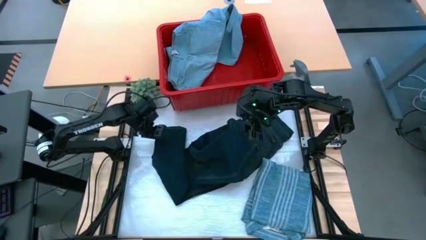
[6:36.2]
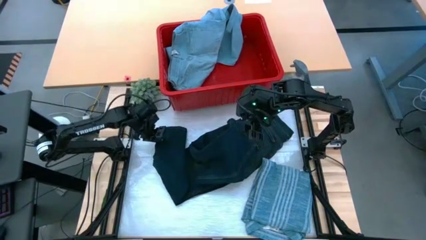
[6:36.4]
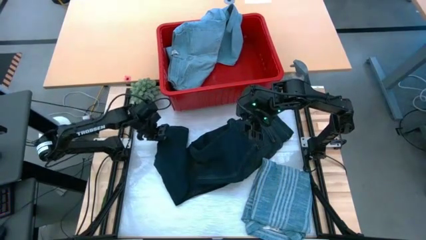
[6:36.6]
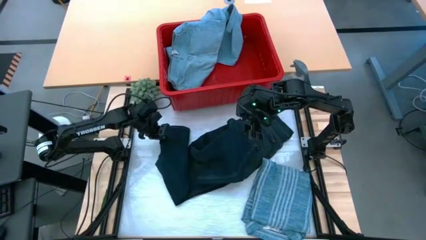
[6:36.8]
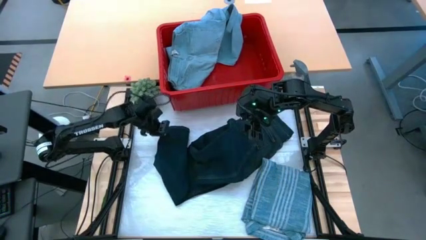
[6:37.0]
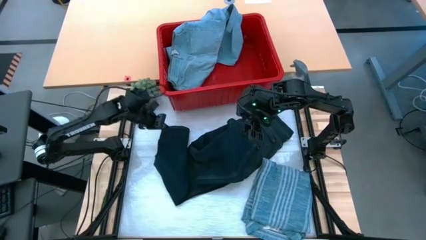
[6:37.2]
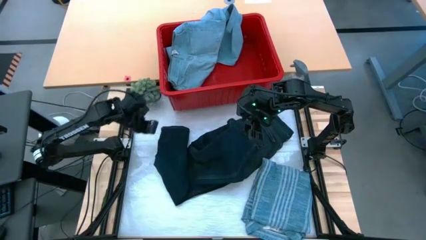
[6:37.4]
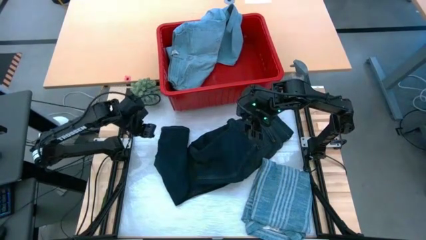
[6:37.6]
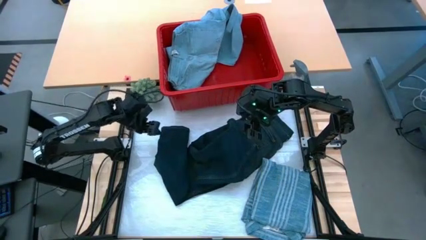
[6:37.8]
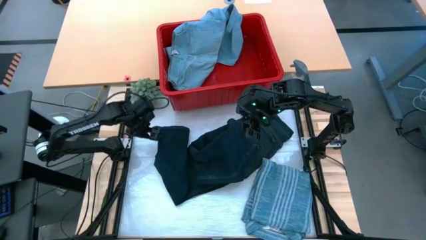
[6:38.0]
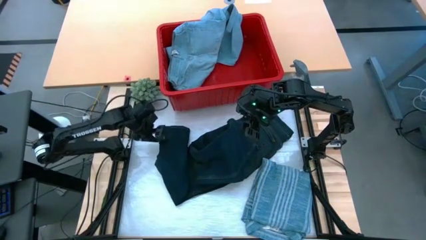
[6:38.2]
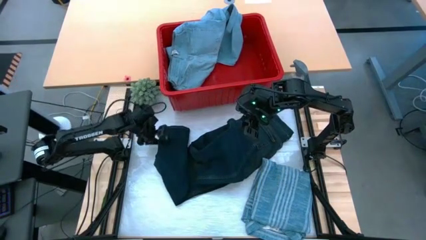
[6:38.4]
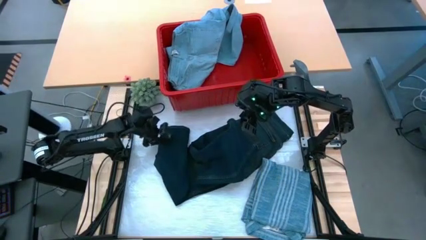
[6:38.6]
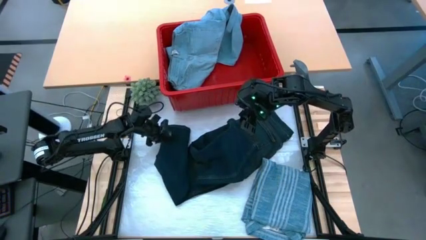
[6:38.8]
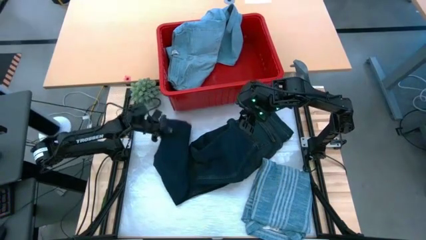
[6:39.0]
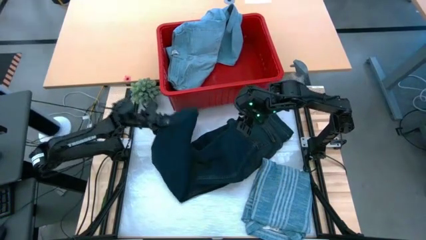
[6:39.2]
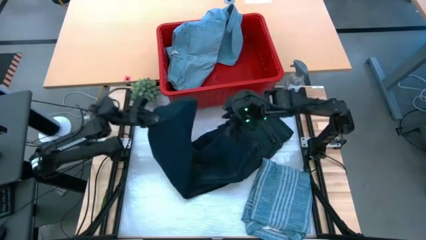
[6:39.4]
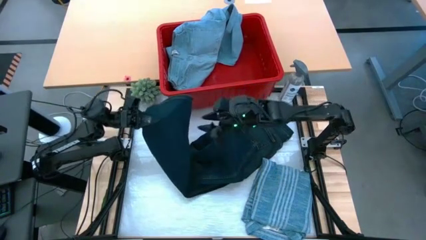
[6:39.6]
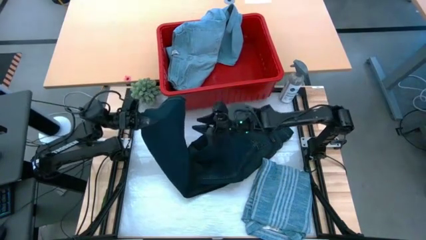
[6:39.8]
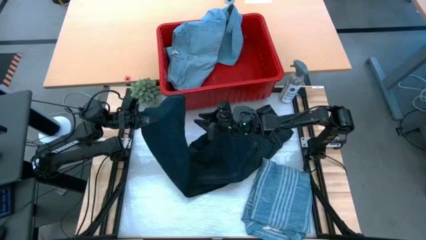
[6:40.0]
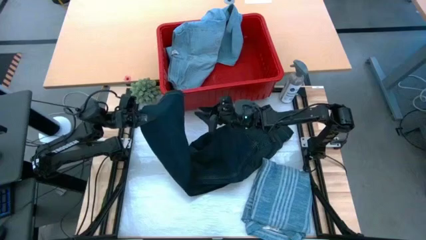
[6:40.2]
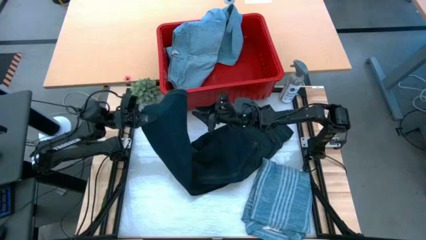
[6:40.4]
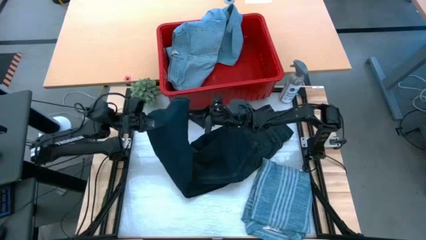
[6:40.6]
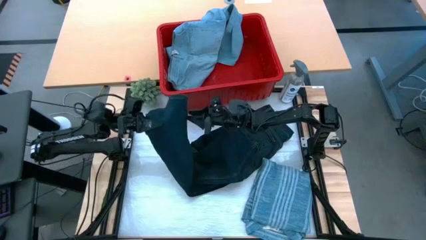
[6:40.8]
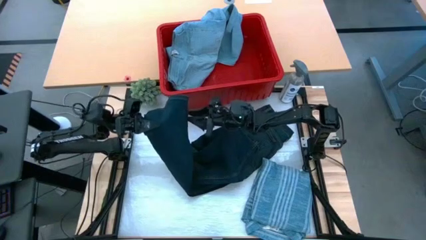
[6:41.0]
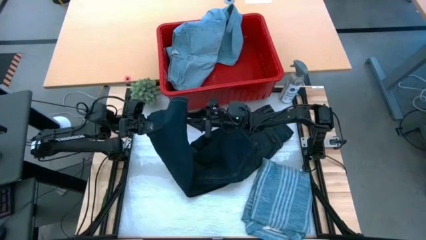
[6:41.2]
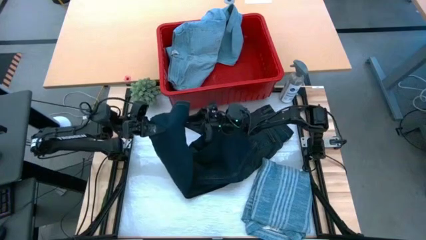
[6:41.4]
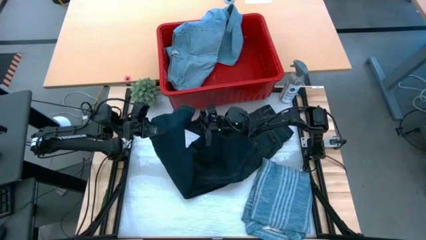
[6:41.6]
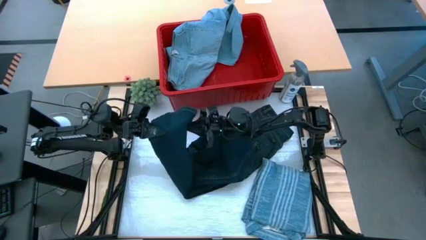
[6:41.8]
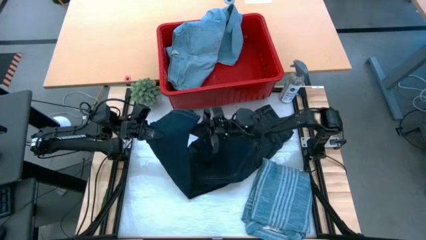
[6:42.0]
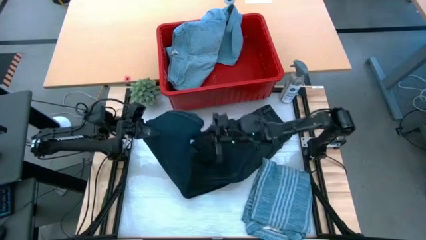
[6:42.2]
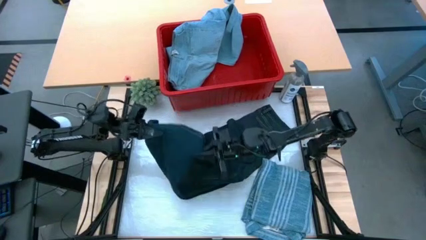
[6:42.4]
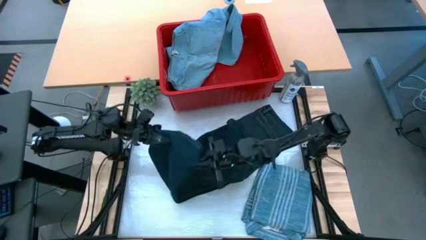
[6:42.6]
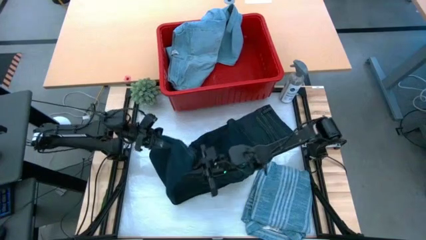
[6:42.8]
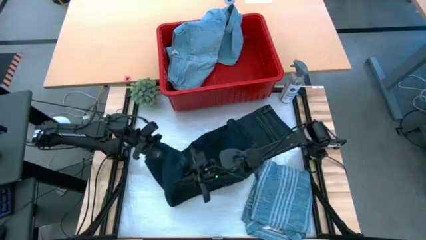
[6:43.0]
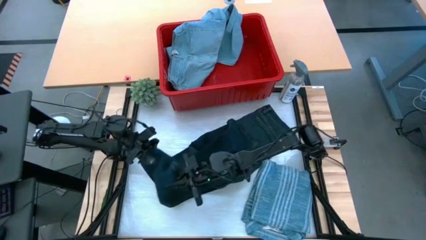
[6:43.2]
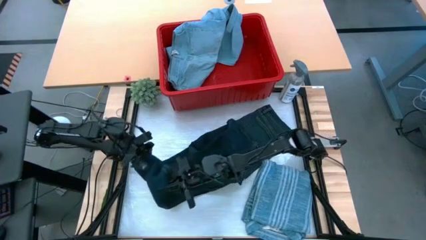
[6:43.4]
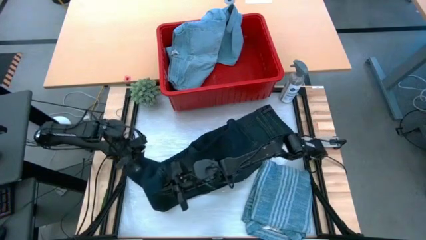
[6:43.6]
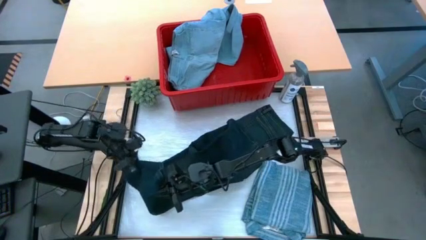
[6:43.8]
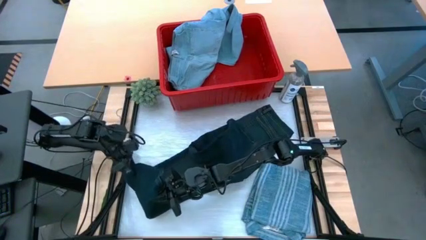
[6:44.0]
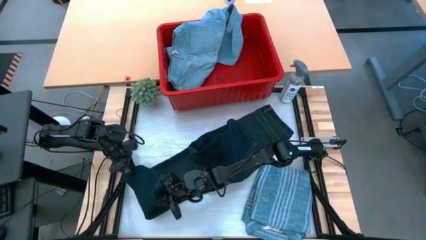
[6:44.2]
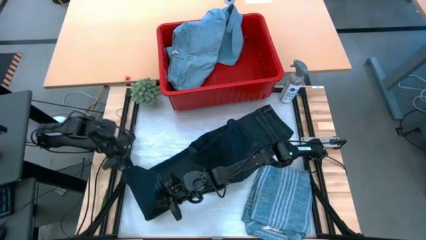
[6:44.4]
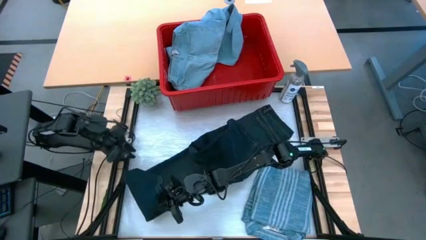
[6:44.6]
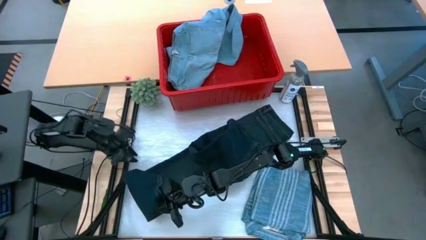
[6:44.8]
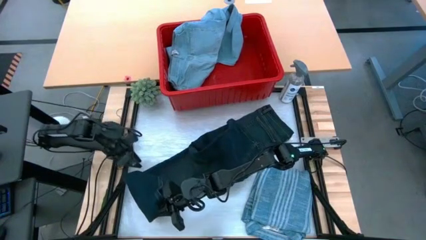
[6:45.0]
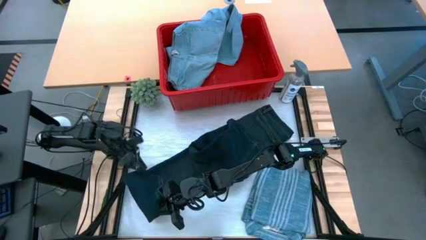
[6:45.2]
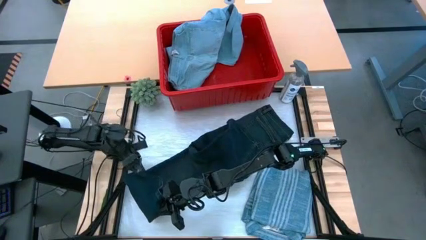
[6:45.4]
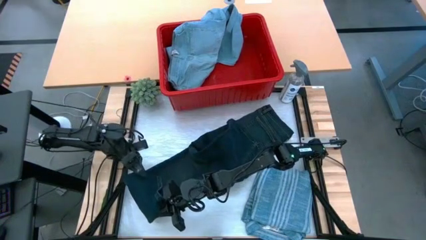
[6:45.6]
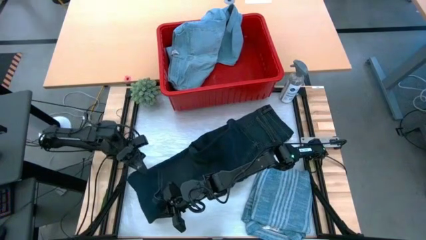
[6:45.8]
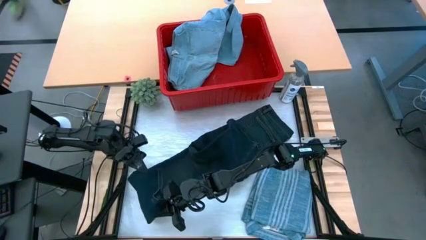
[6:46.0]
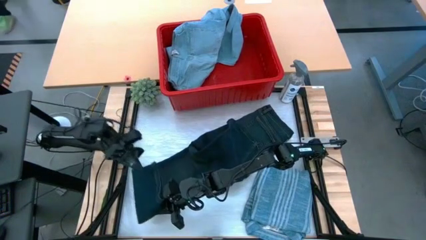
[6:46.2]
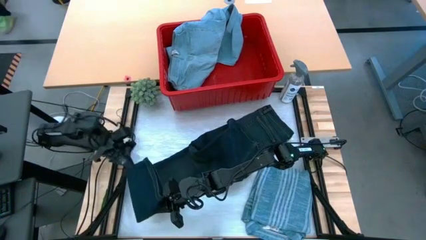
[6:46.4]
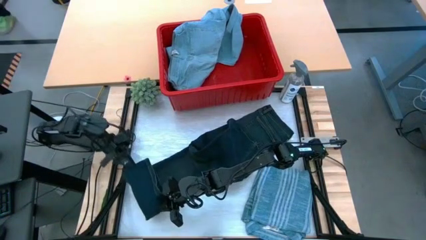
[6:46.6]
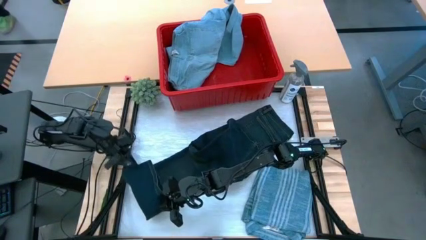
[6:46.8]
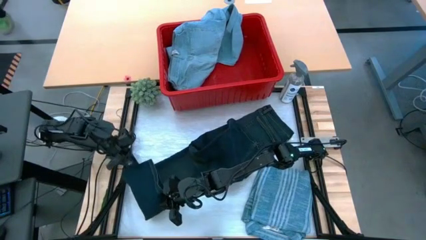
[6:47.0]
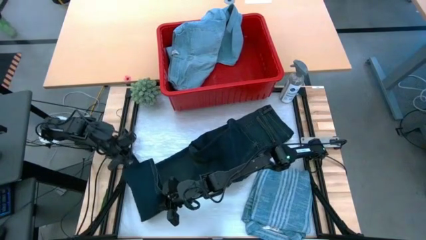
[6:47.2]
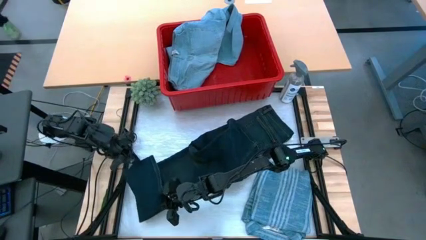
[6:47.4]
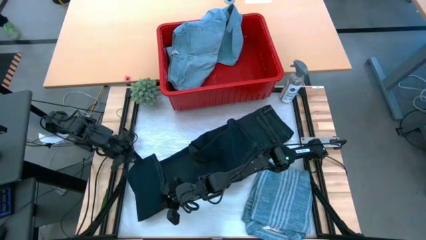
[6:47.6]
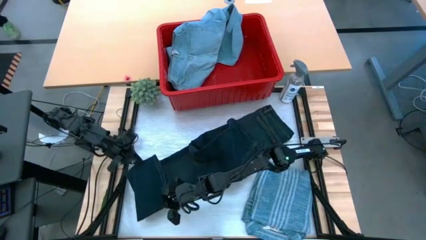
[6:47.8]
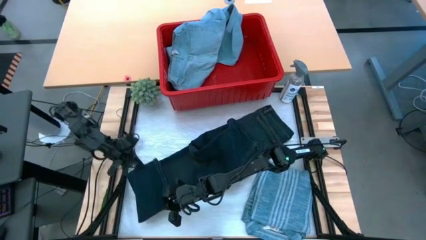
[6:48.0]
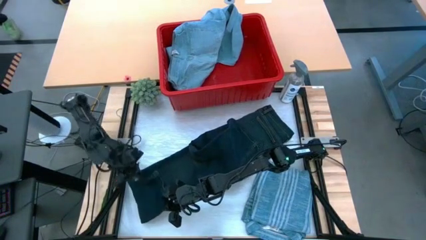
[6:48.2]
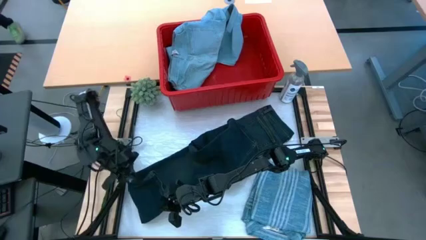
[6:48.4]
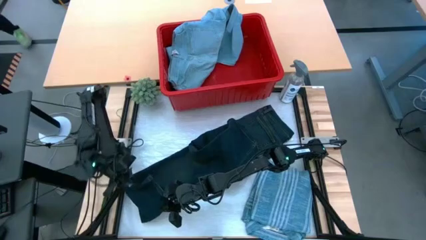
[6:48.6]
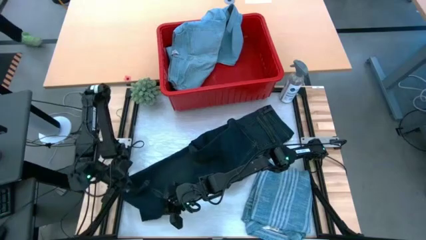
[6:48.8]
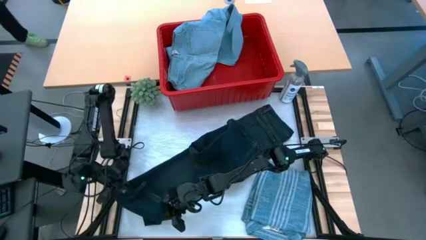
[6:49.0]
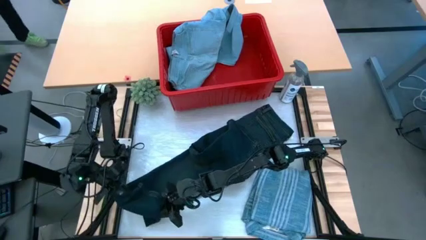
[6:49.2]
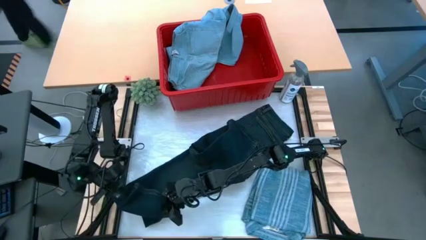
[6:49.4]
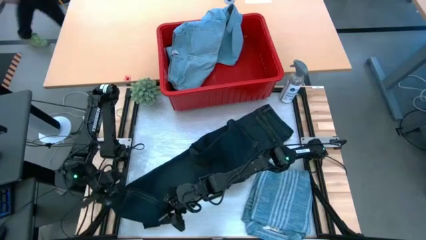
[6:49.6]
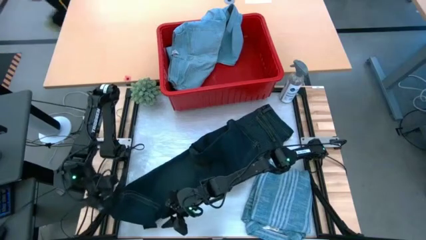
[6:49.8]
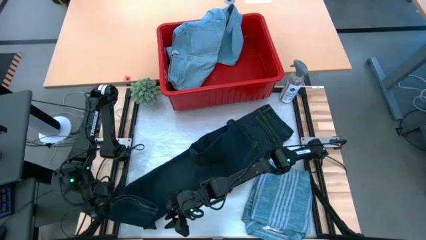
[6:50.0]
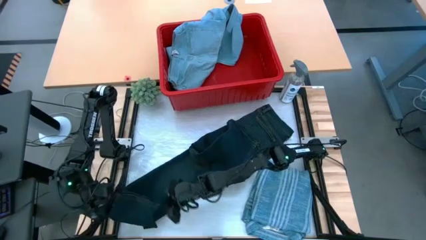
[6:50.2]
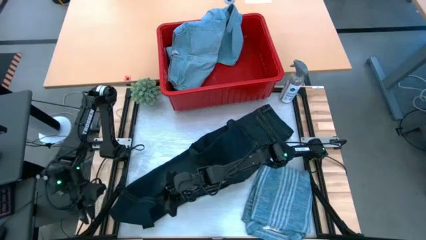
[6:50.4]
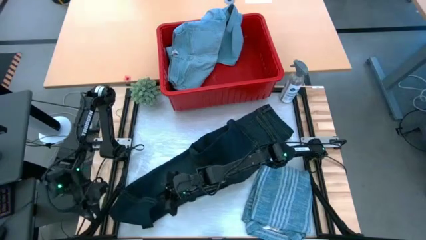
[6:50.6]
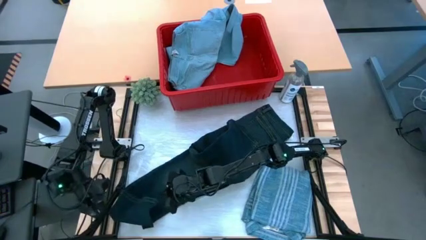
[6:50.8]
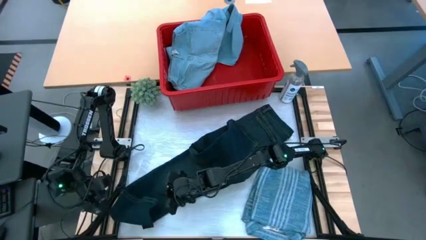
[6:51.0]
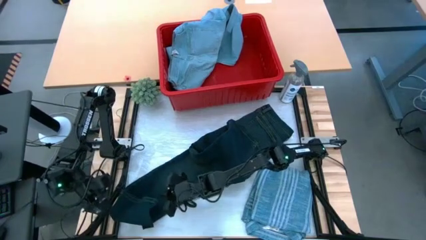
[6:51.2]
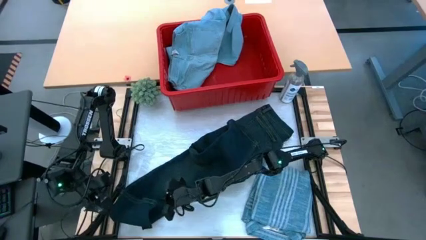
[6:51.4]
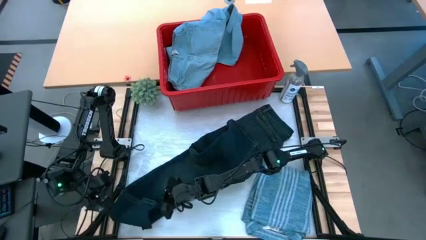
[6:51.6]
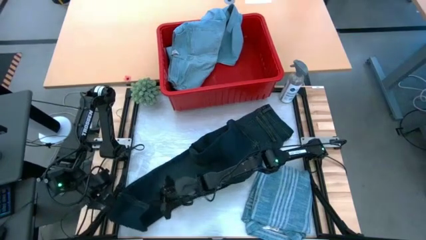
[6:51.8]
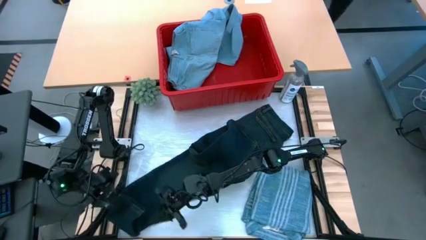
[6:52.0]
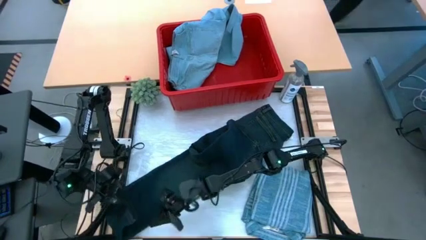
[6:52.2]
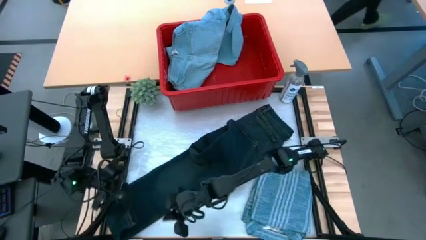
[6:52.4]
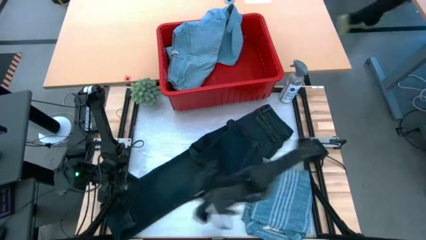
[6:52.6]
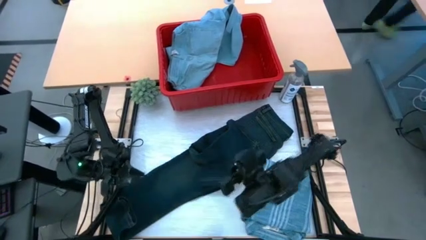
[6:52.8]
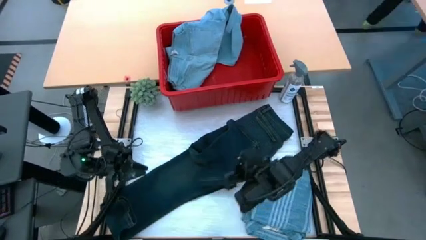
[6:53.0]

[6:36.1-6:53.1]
Task: Fold Laundry from Bin
Fold the blue denim pants
